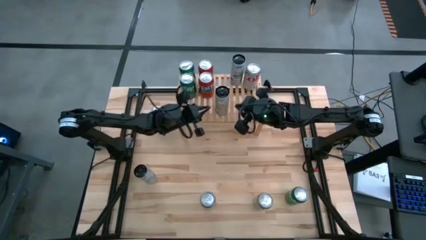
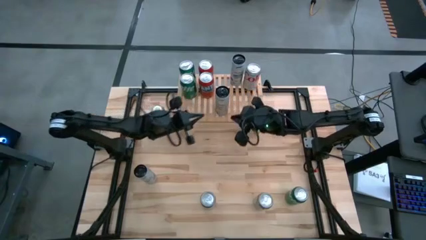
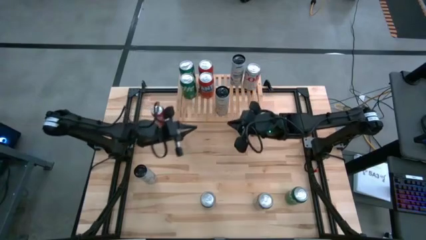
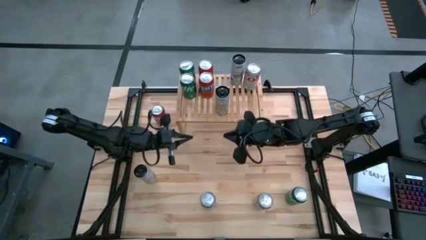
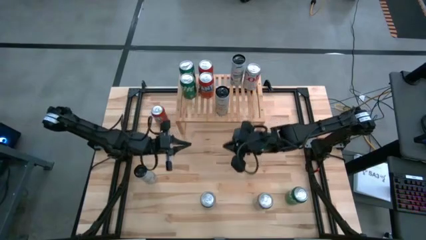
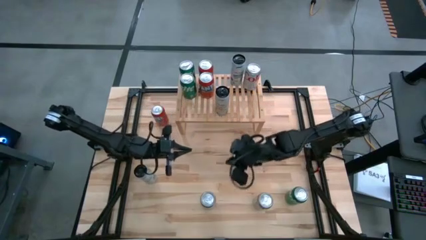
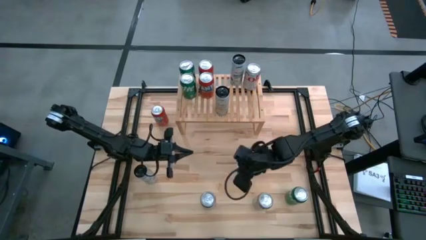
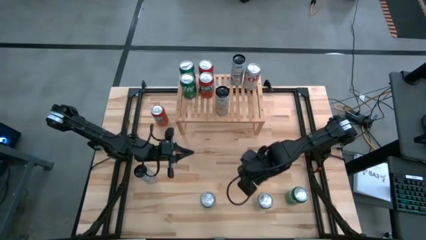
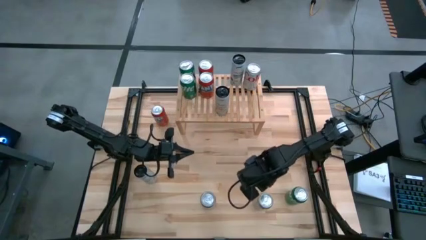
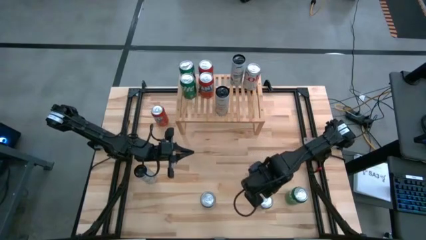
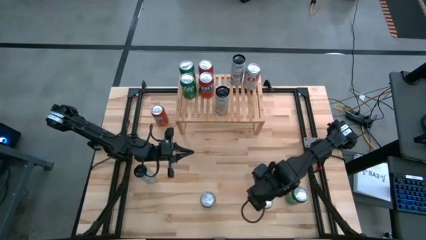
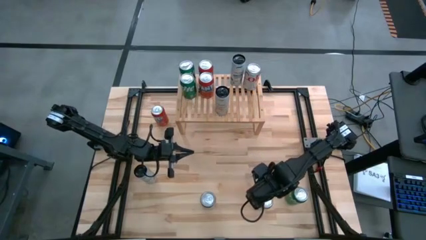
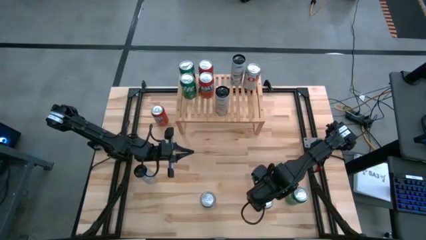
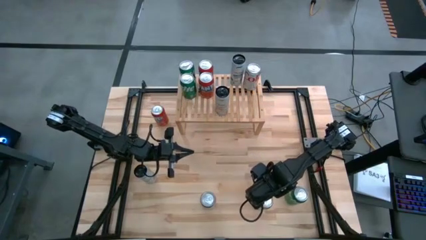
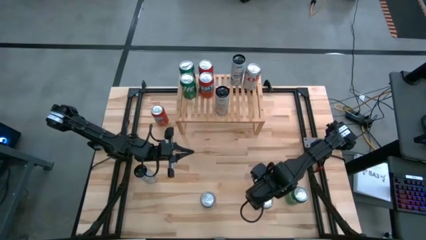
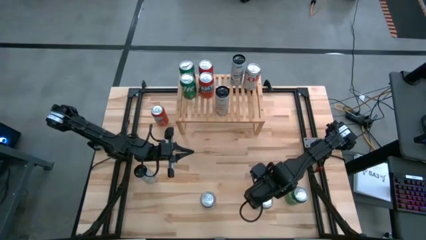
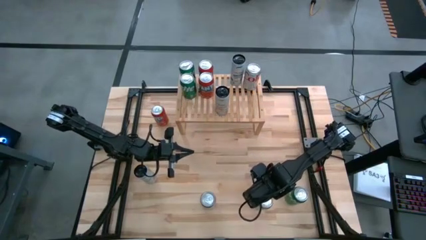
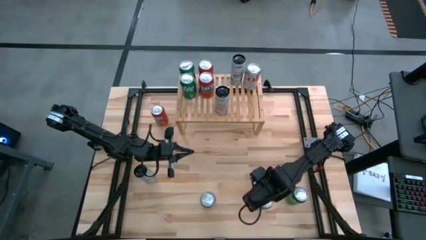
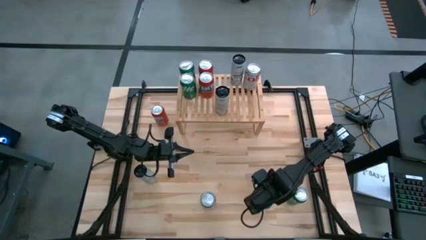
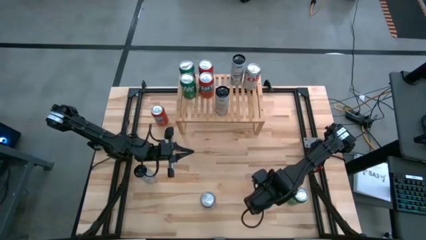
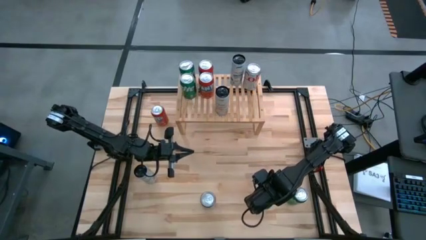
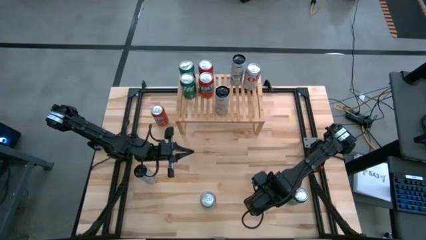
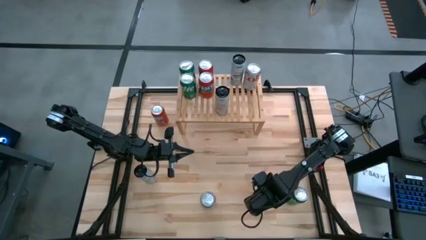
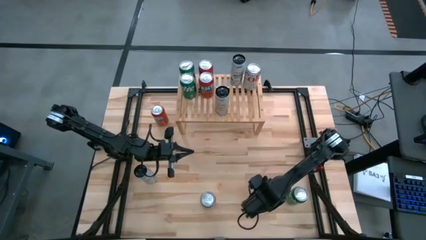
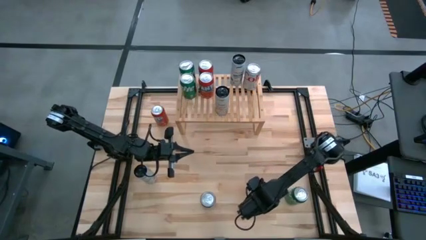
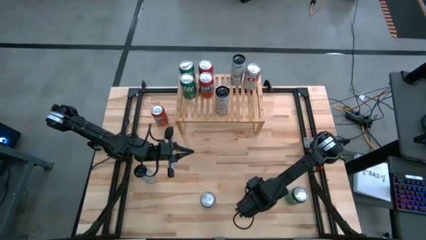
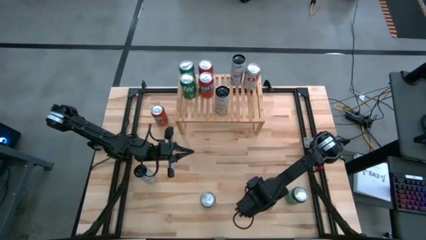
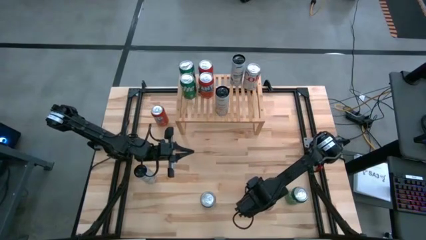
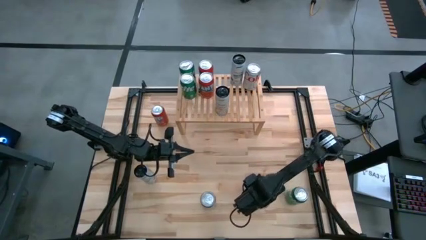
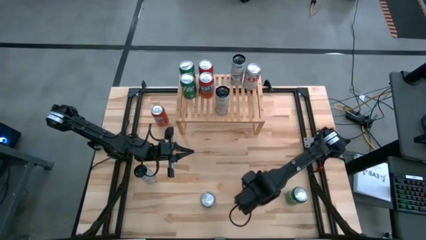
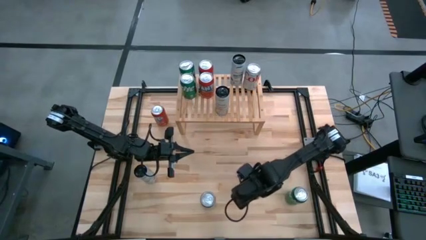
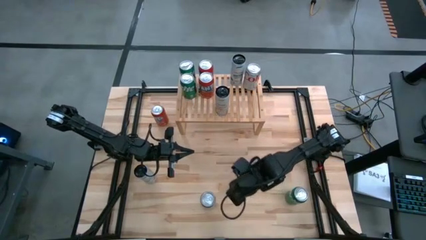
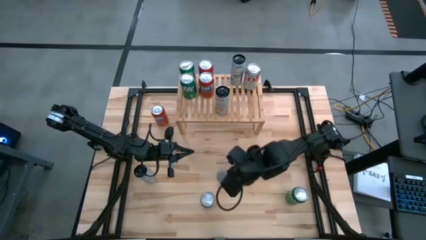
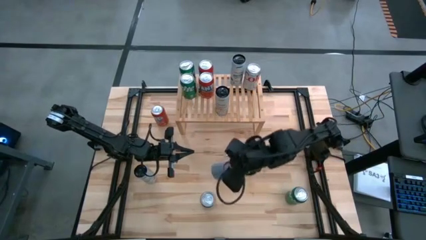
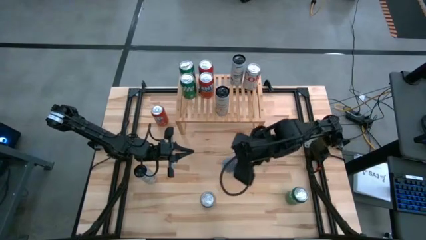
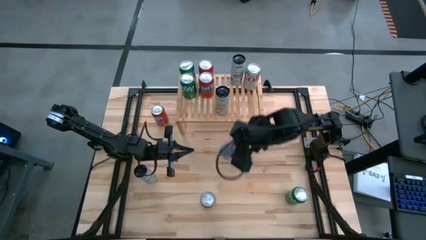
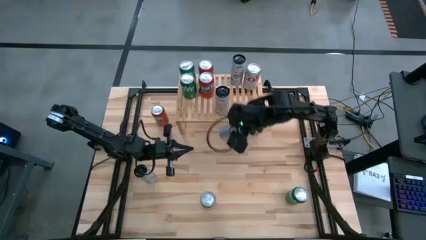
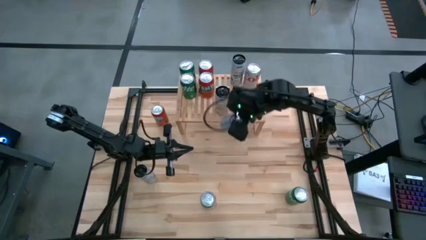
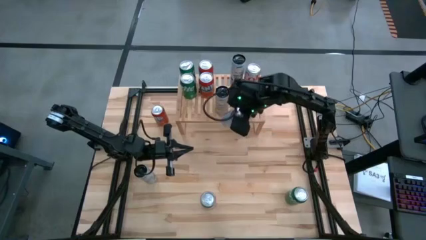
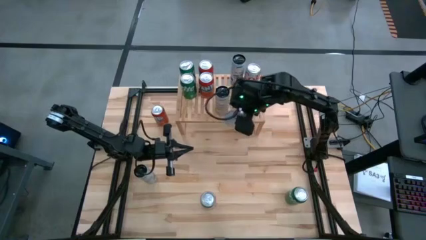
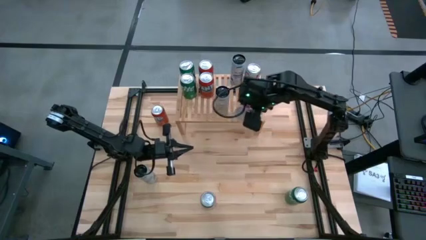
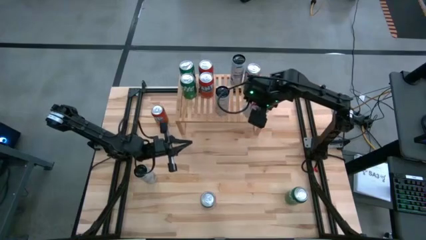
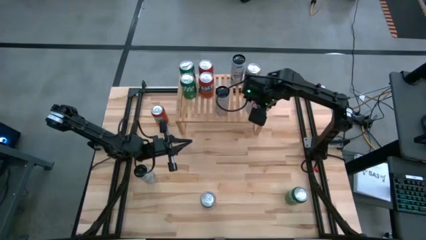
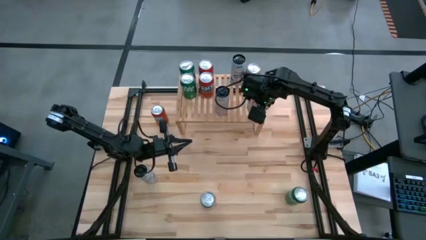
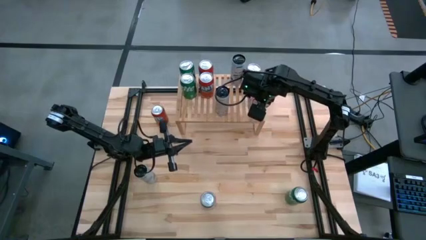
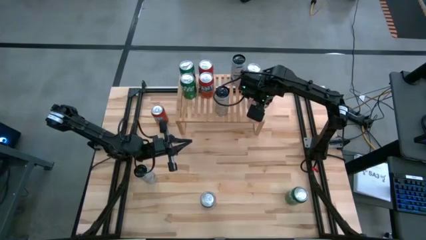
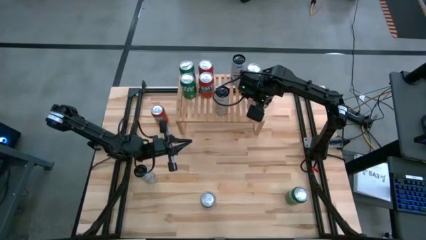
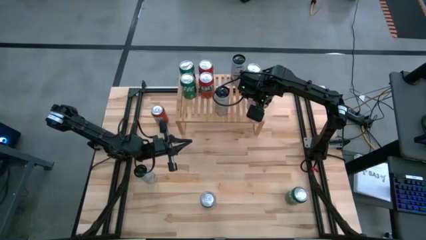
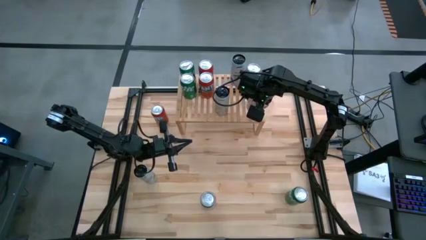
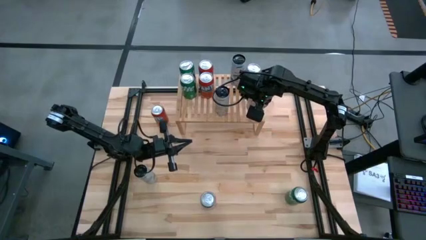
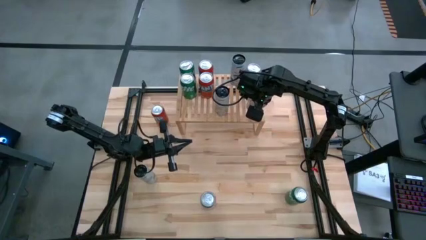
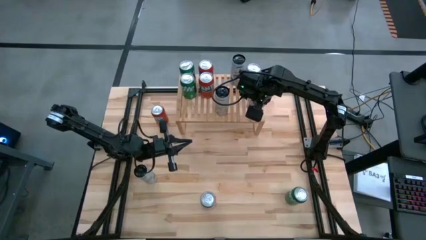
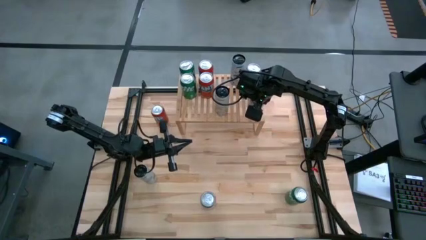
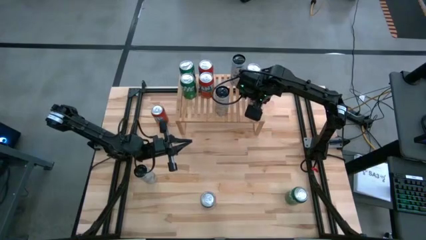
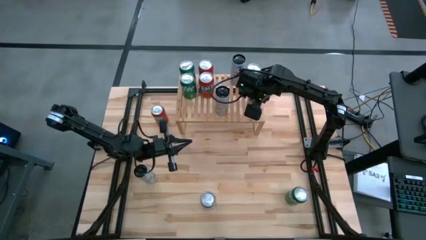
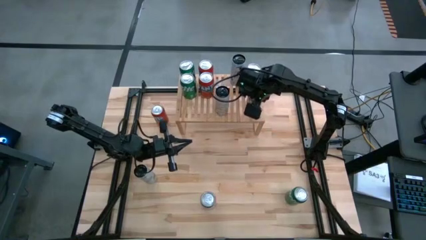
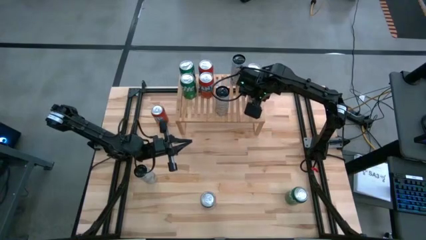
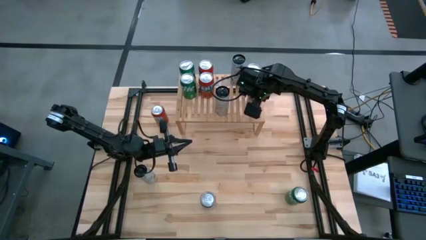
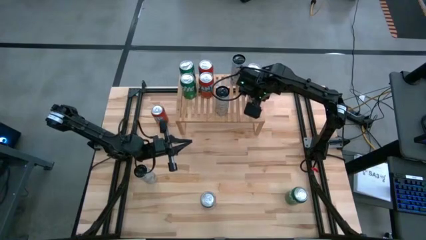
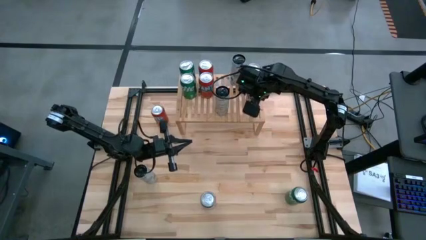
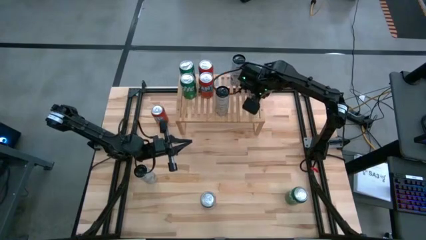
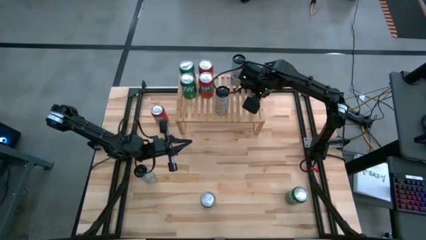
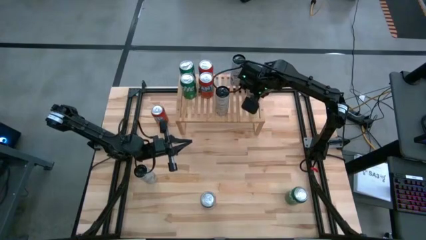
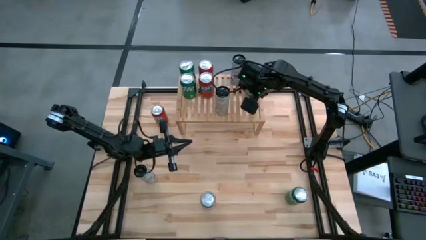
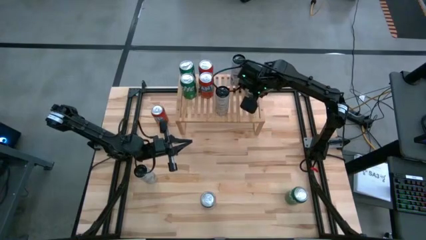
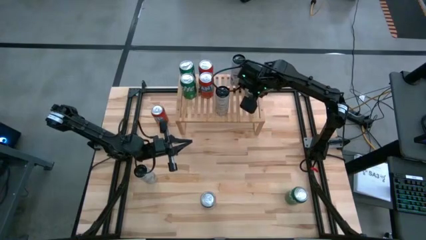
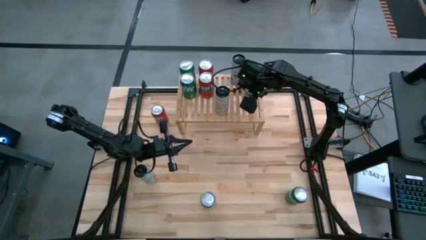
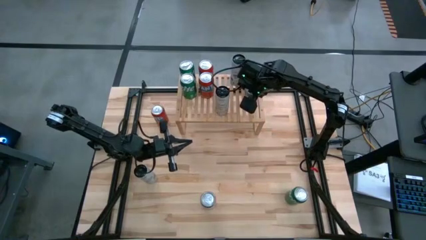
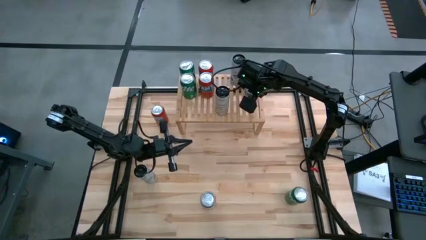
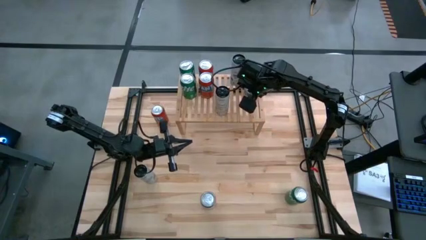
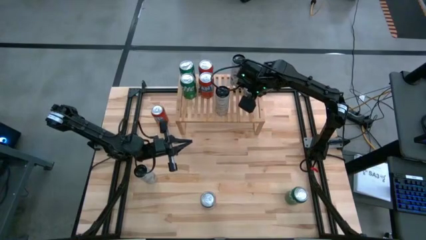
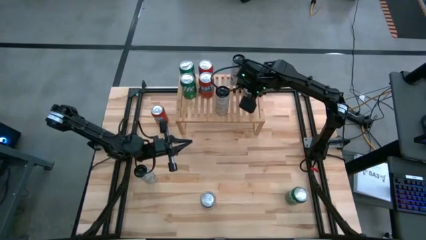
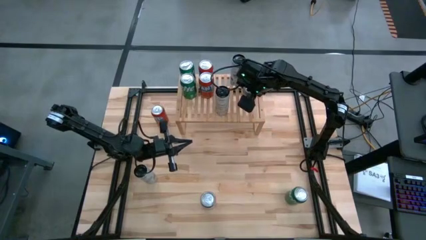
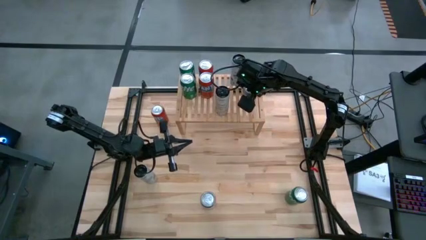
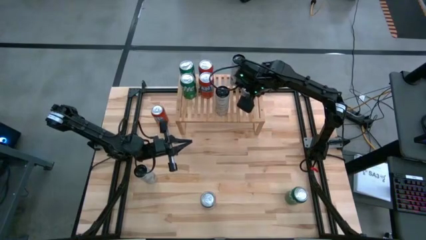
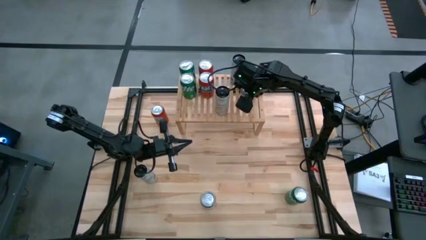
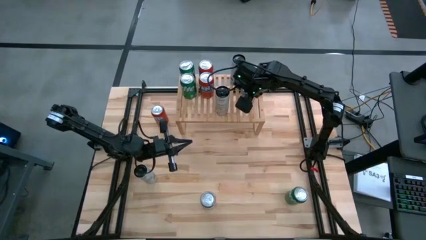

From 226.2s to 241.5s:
Task: Place canned beverage on shelf
Put the red silver soda can aligned with the other red silver soda can on the shelf
